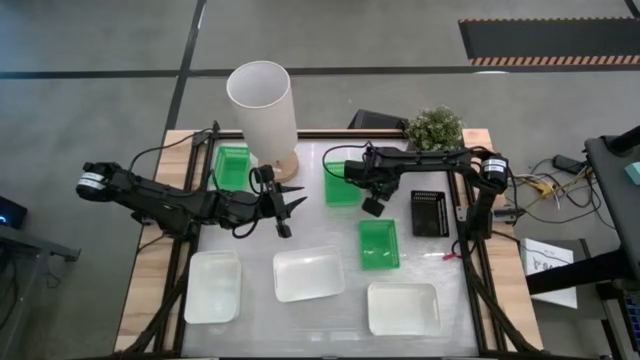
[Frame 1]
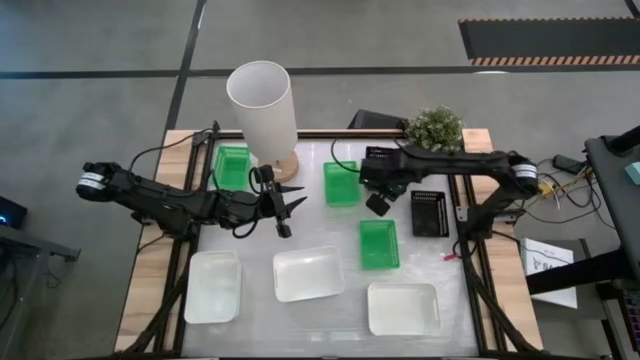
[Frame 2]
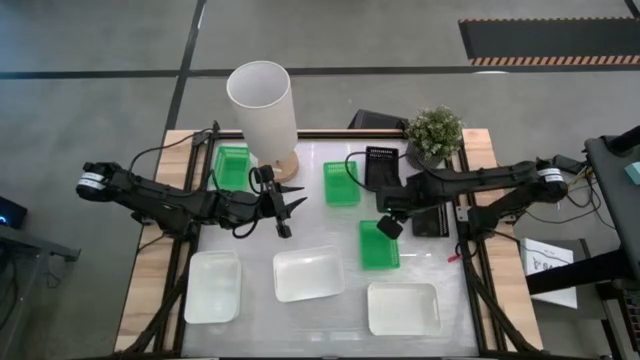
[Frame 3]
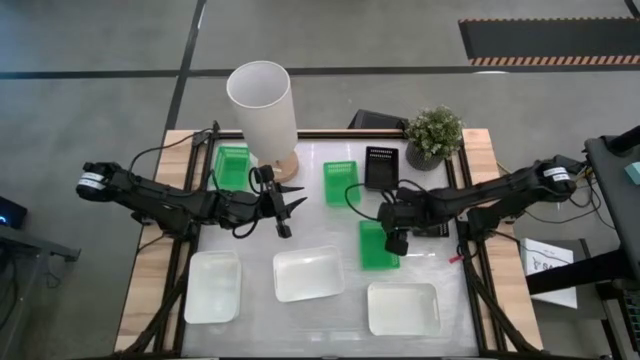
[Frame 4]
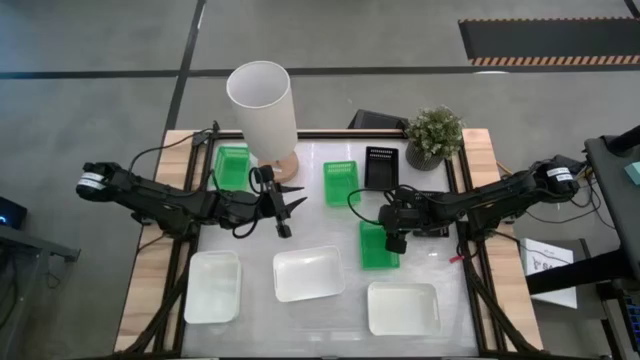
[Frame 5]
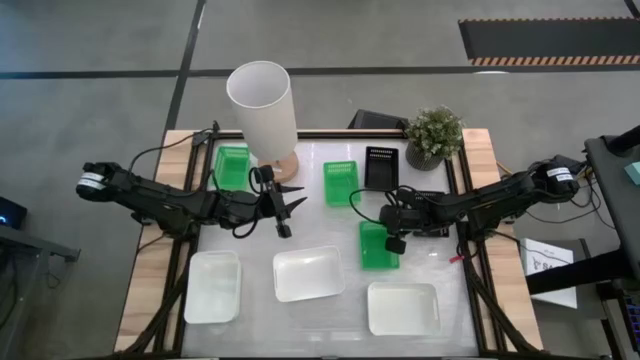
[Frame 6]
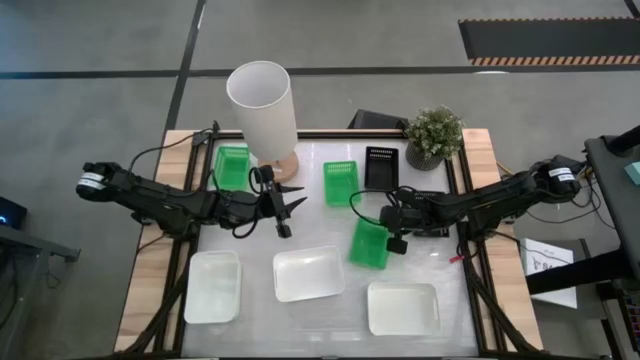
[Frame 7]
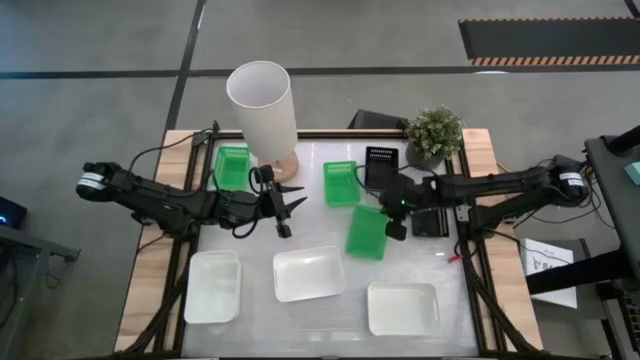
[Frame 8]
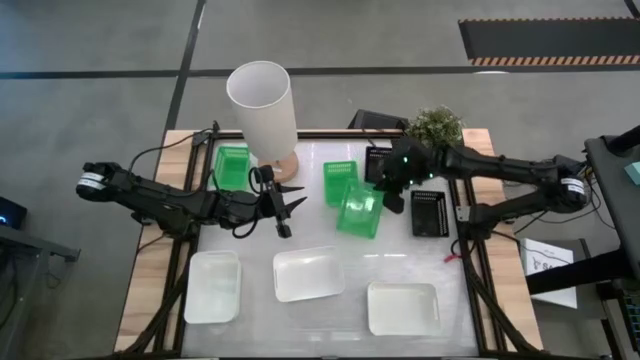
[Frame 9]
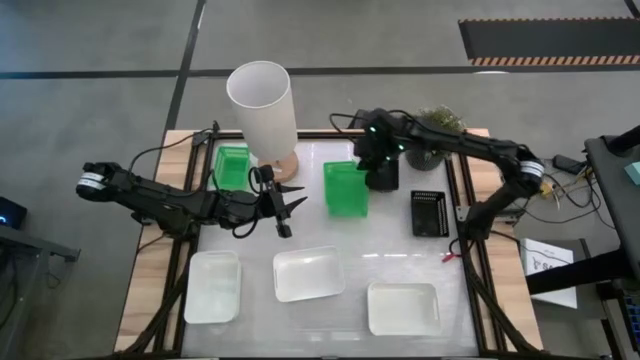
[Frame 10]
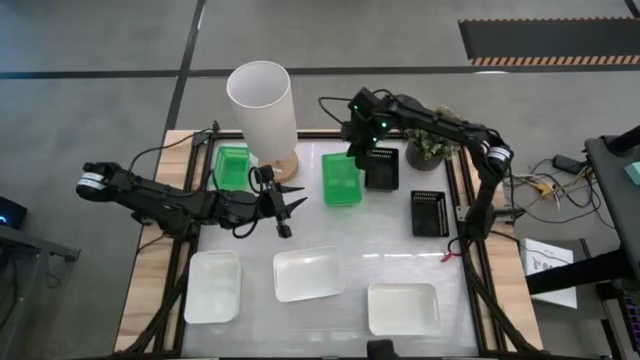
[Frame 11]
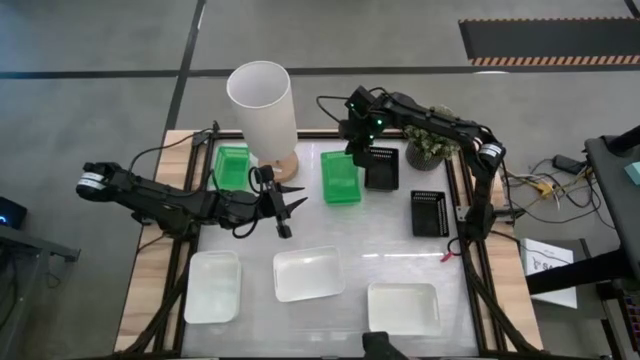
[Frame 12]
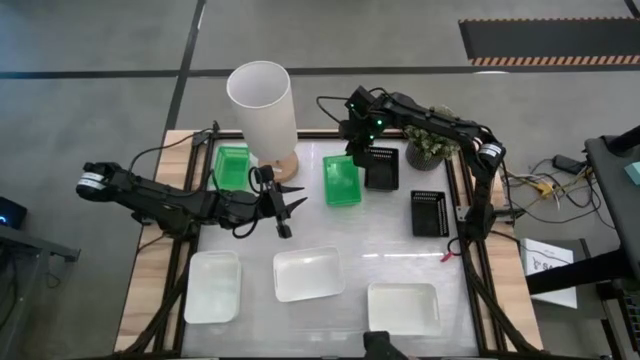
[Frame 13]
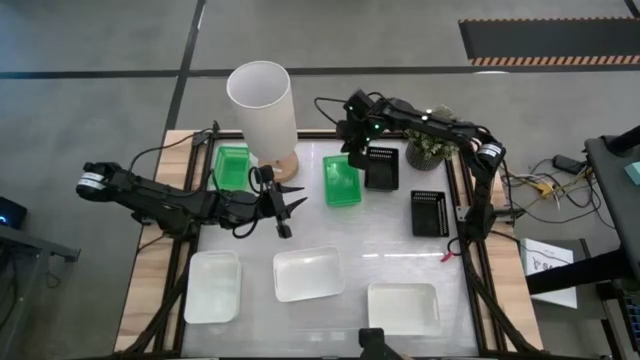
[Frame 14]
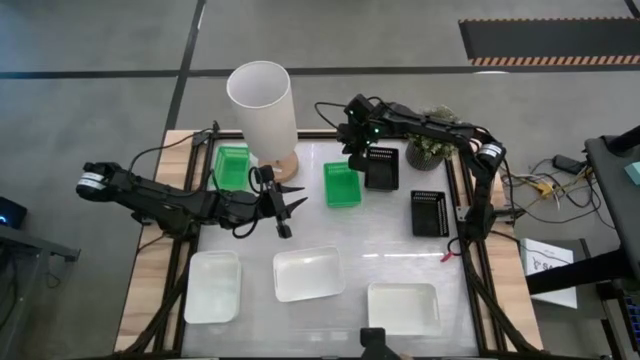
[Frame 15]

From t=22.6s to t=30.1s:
Stack the bottom green bin on top of the other green bin

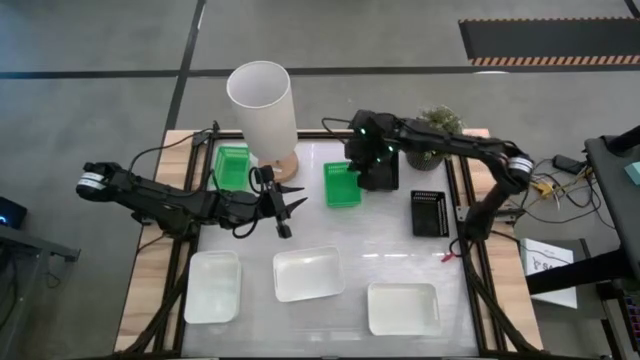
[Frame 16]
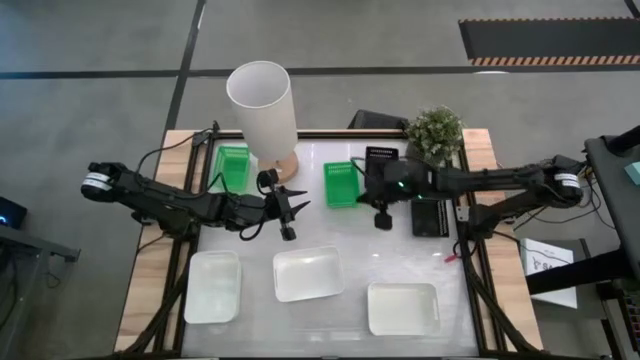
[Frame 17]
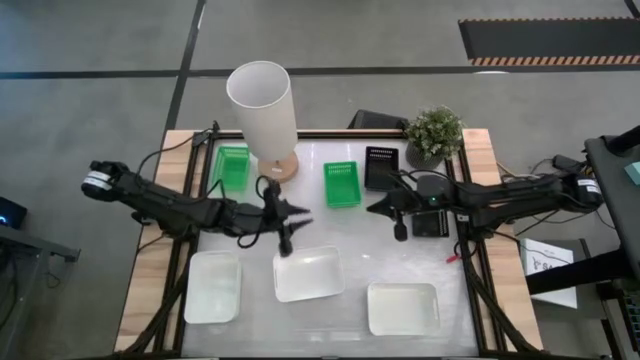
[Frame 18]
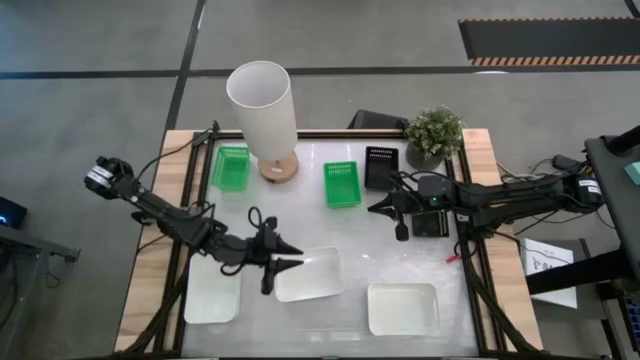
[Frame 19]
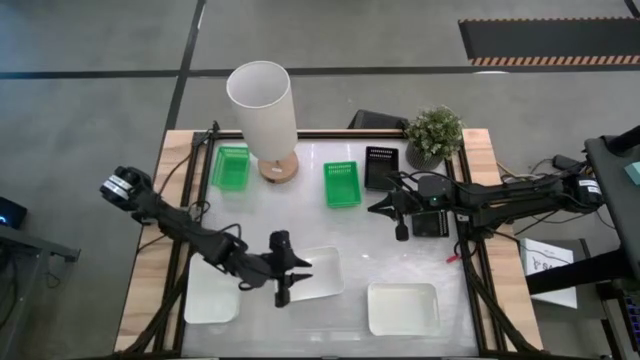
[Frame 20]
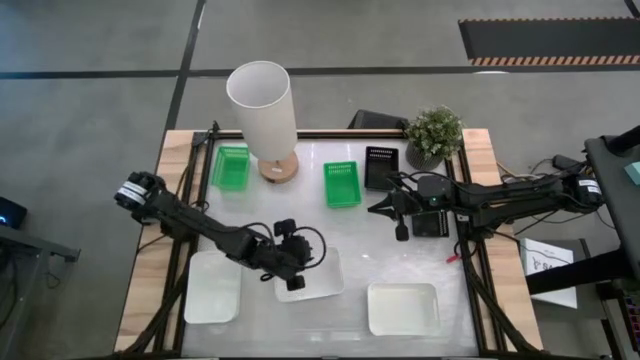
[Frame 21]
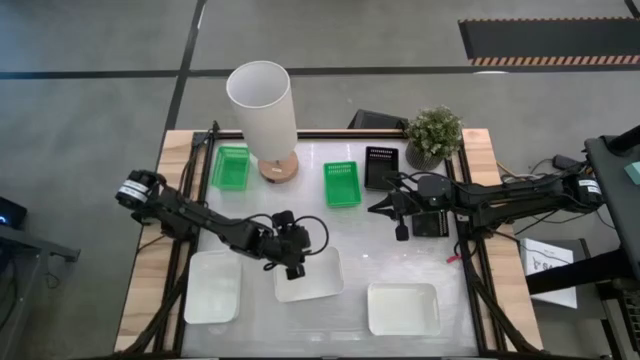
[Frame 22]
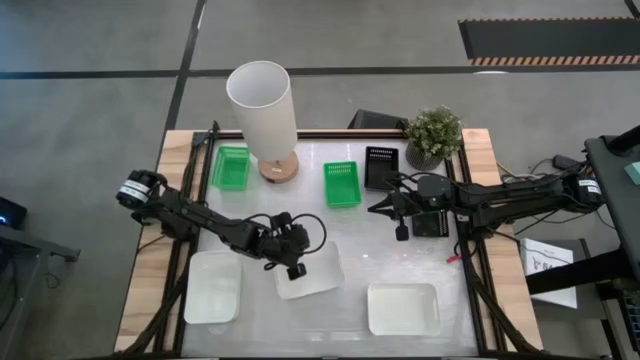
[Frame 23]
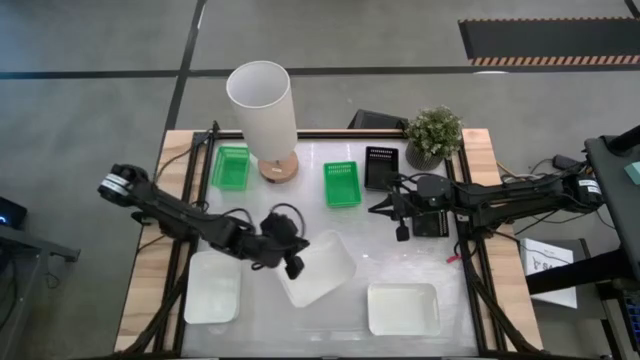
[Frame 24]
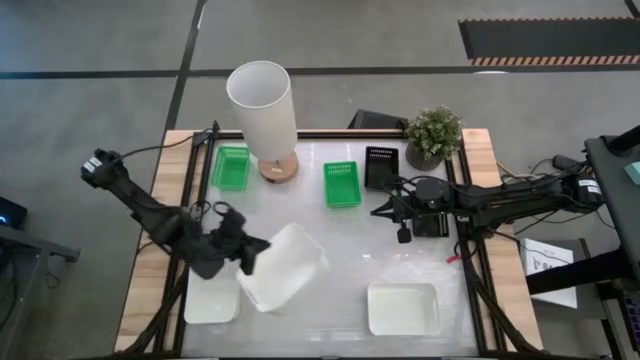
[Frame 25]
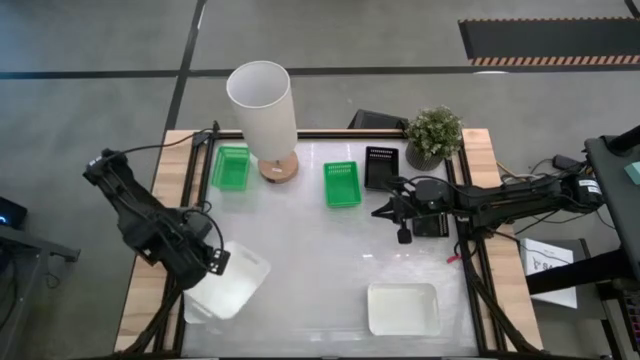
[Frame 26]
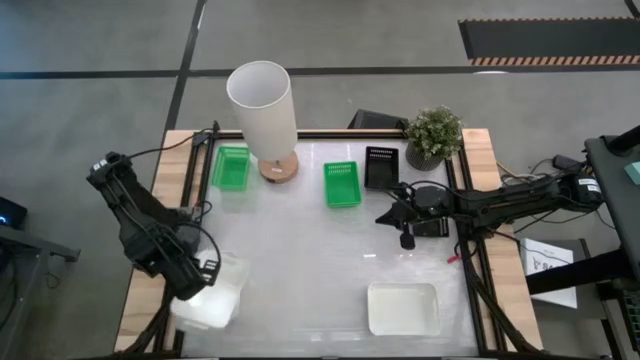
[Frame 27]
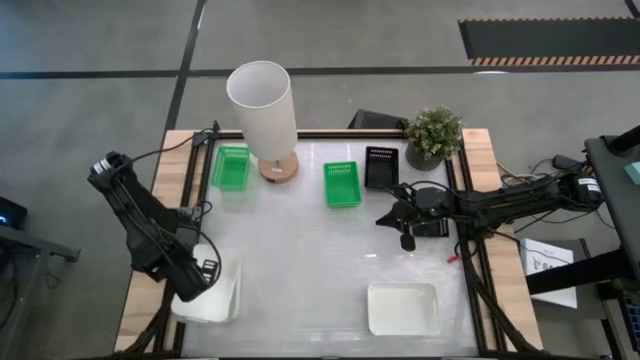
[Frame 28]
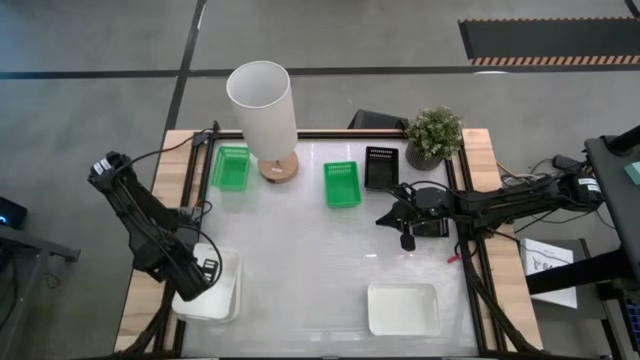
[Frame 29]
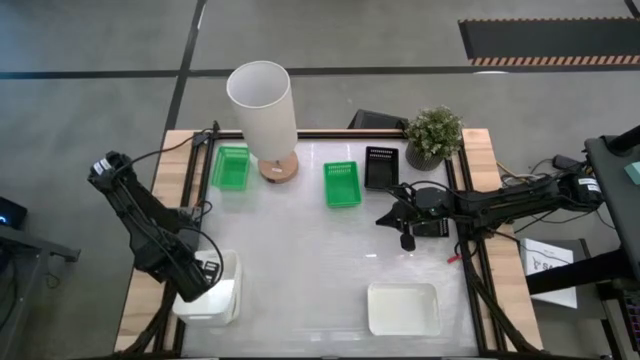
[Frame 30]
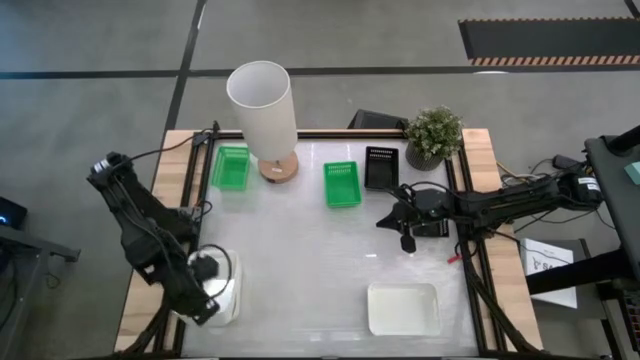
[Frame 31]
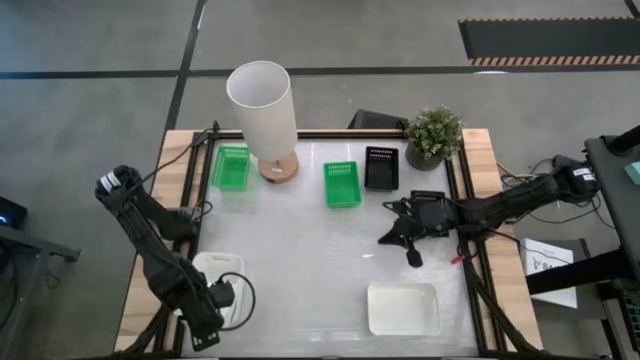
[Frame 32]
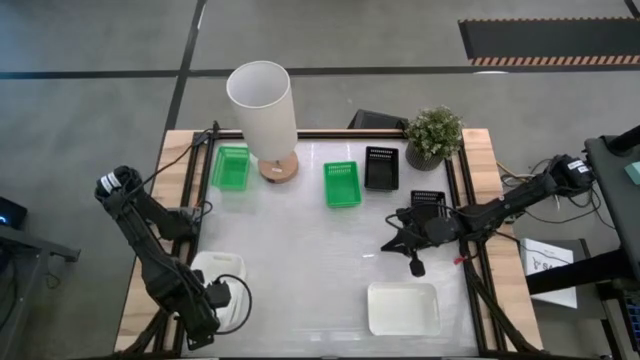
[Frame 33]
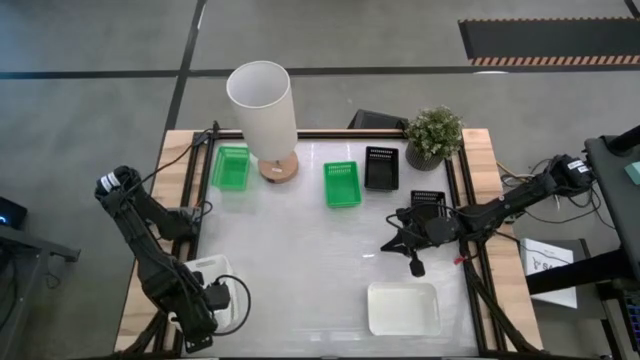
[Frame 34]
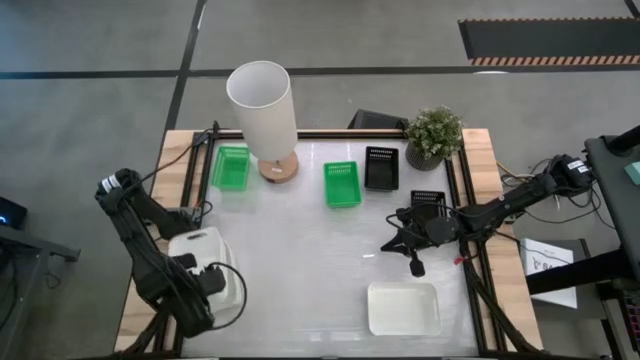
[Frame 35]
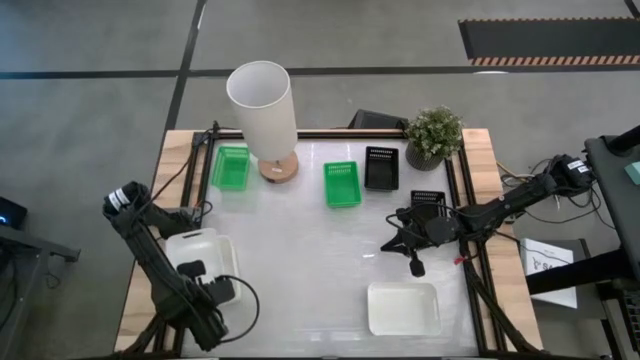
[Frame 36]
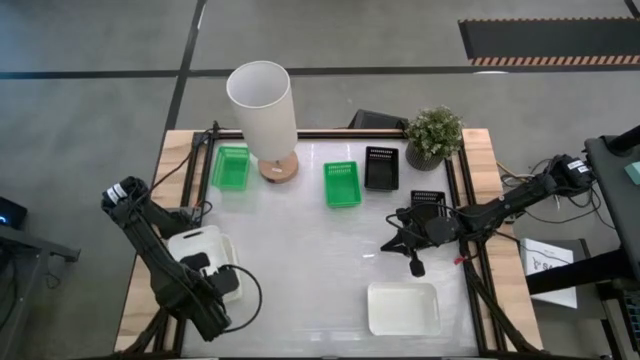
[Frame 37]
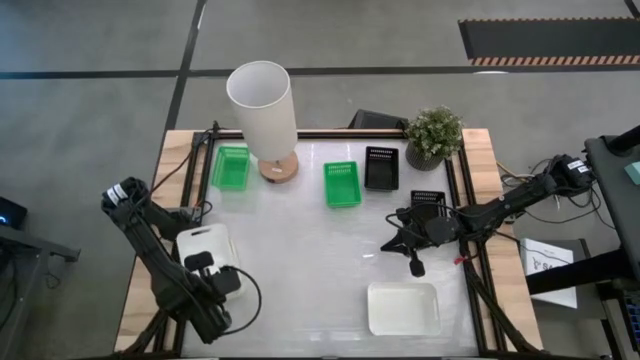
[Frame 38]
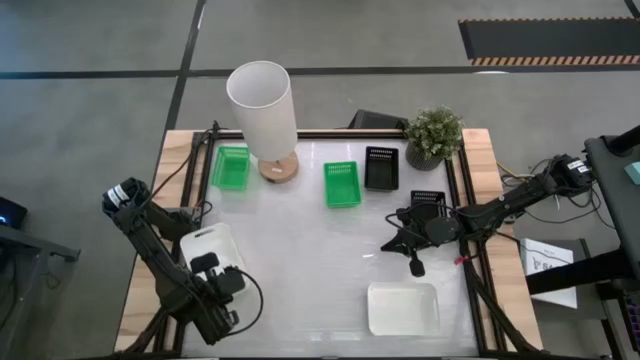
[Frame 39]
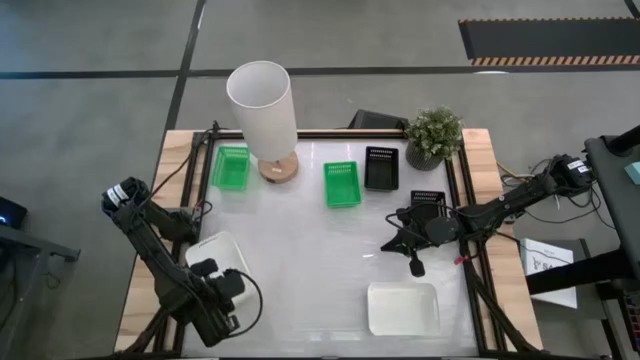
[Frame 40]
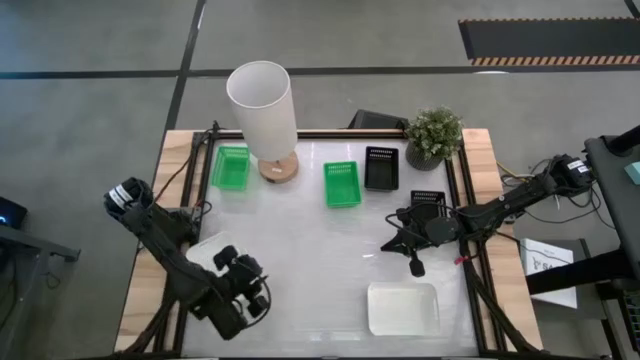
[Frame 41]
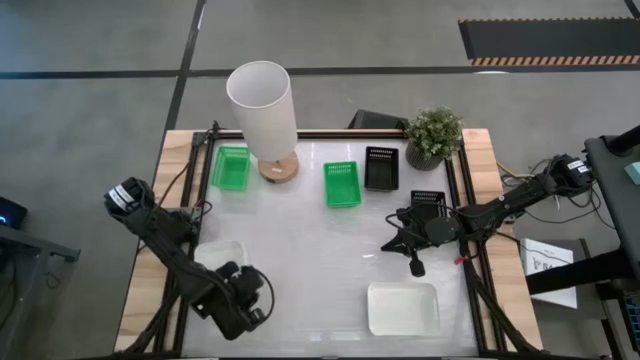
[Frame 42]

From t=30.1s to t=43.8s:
Stack the center white bin on top of the other white bin
